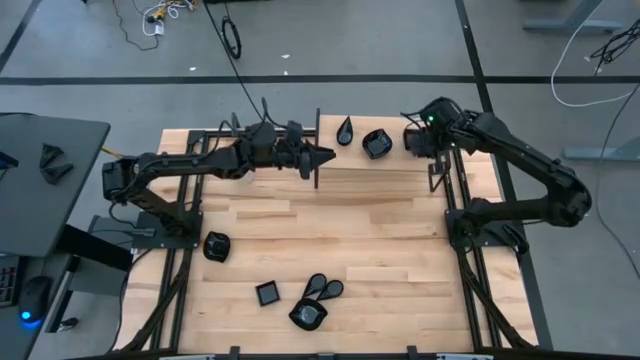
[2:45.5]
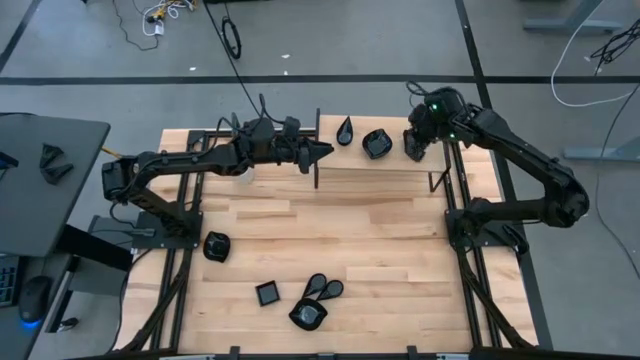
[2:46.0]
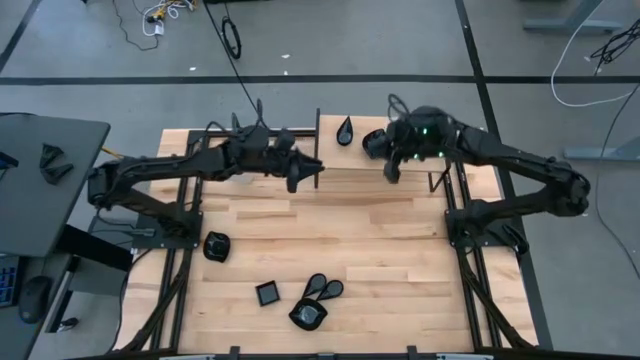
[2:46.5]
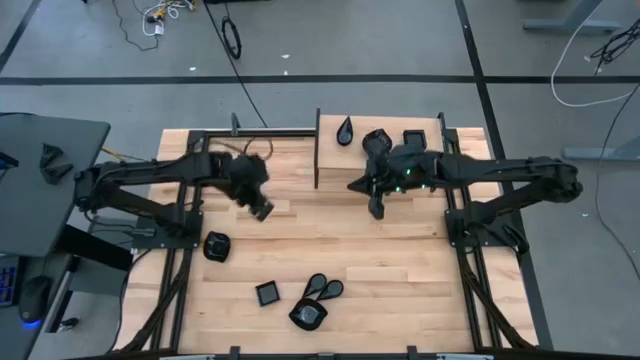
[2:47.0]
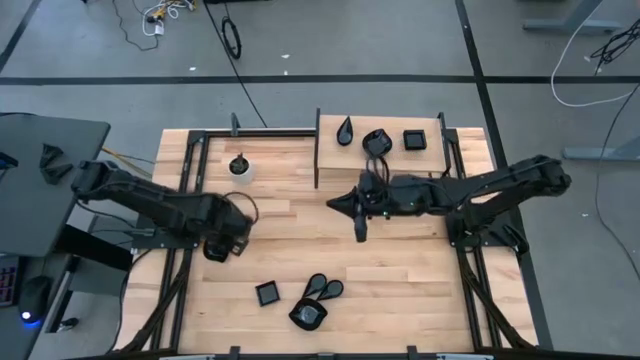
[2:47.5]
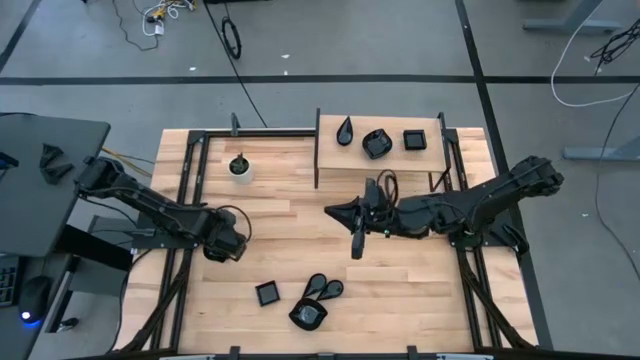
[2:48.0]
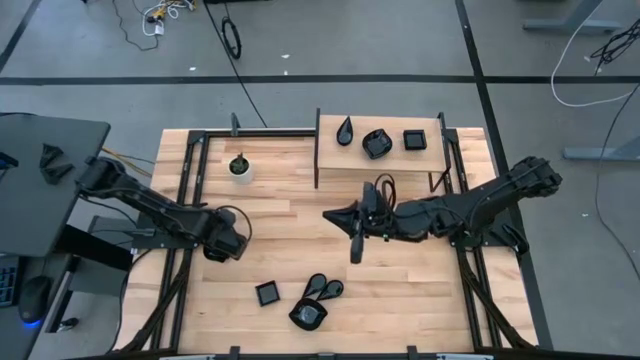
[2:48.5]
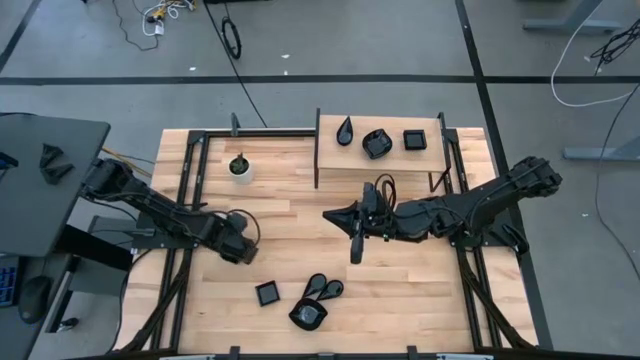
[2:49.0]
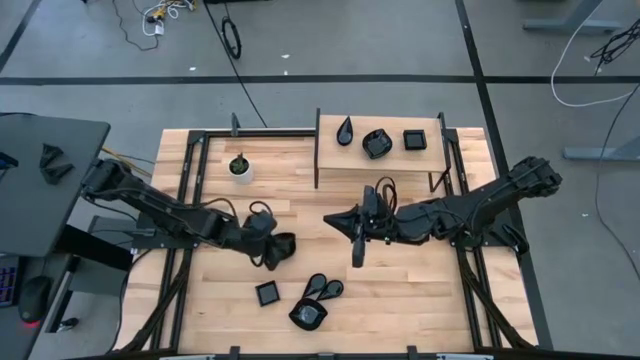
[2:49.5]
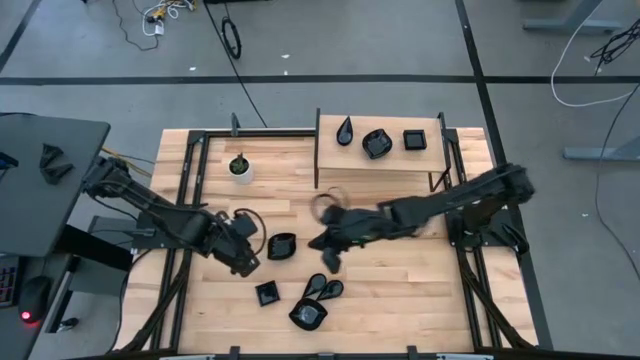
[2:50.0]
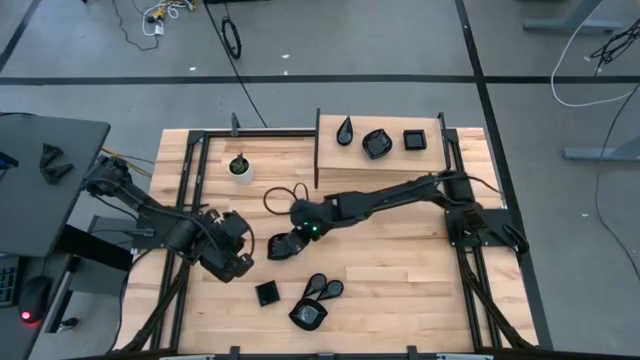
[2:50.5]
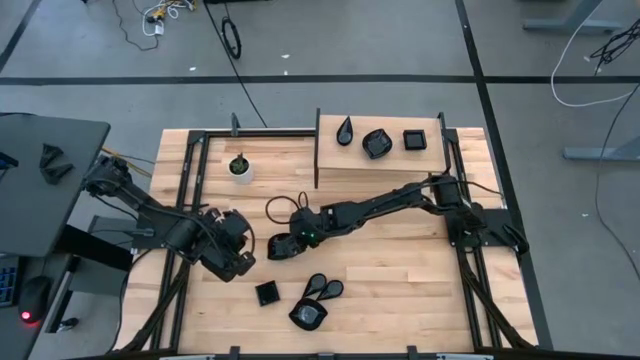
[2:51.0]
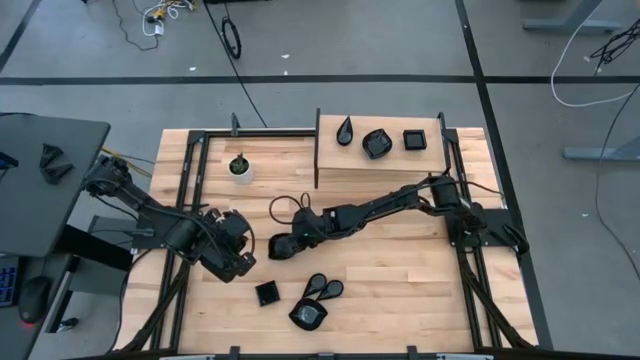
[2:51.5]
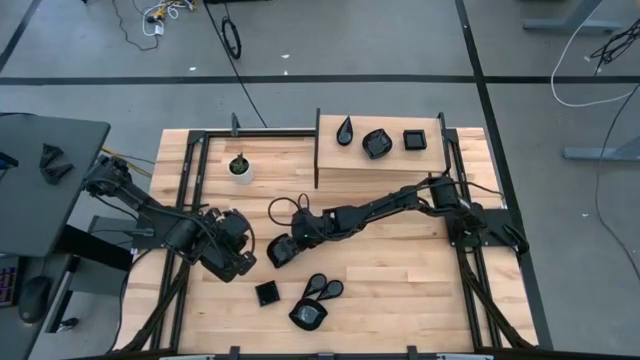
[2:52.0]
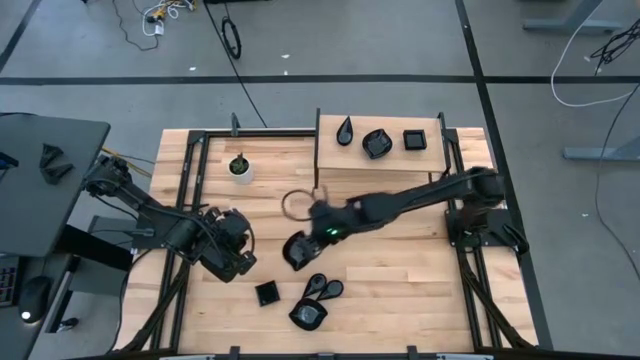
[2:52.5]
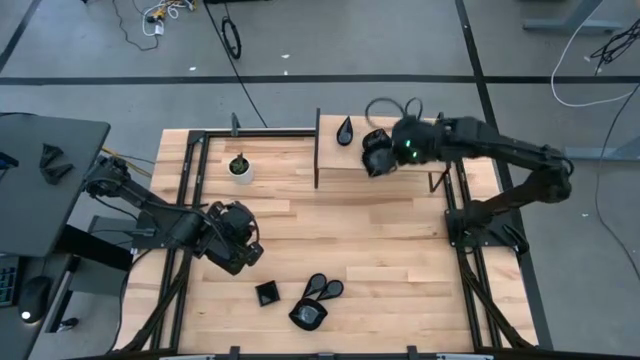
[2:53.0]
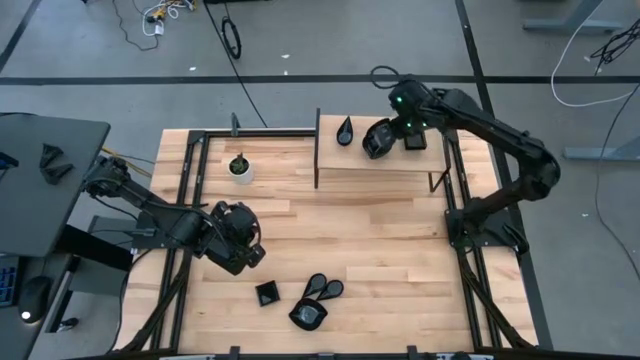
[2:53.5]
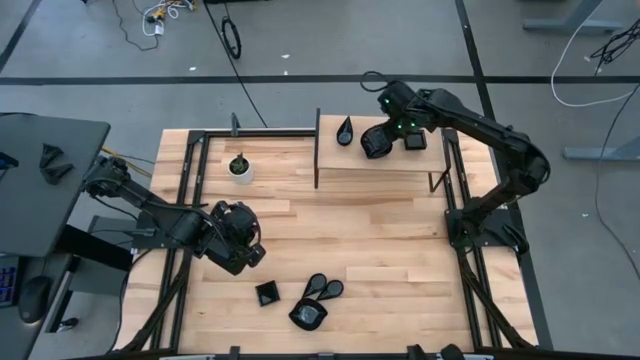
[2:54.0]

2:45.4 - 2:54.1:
Task: Pick & Place Mini shaped plates
Stack the leaf-shaped plate on top of the leaf-shaped plate on the shelf

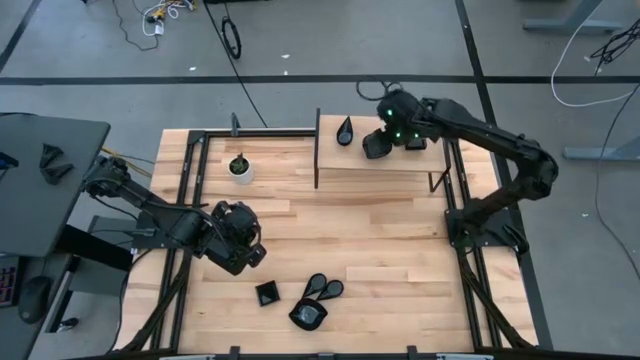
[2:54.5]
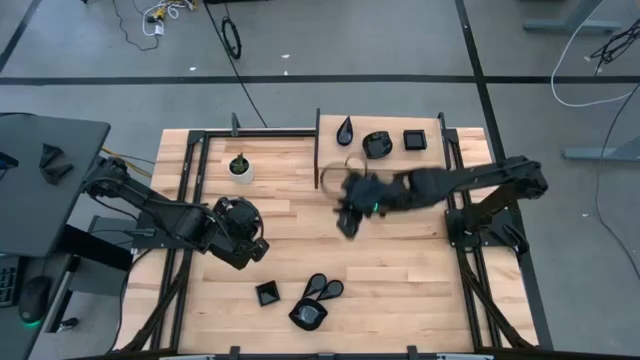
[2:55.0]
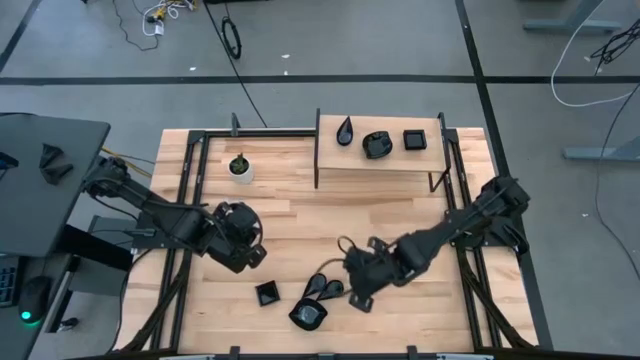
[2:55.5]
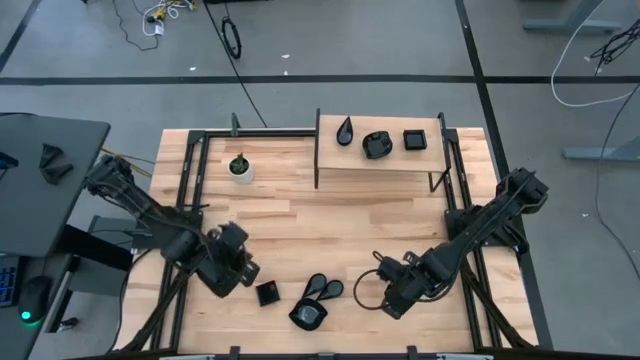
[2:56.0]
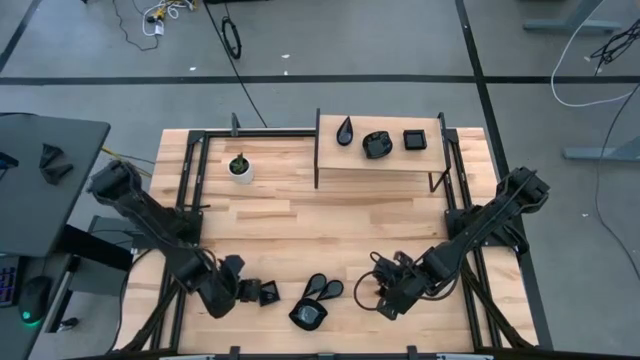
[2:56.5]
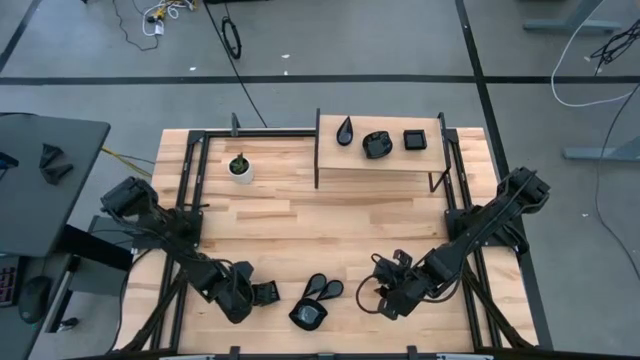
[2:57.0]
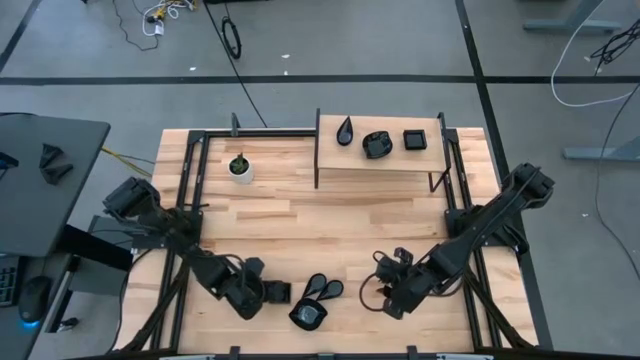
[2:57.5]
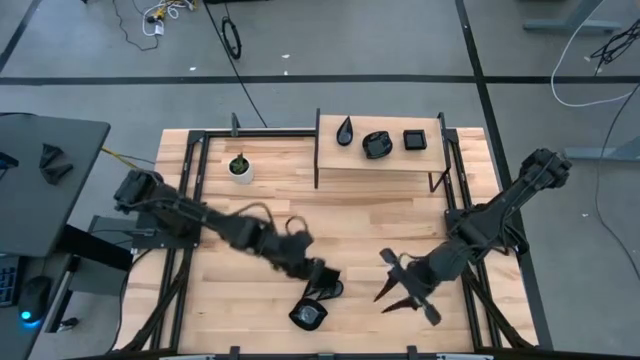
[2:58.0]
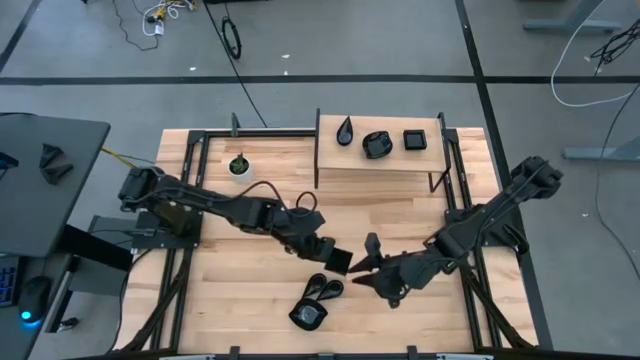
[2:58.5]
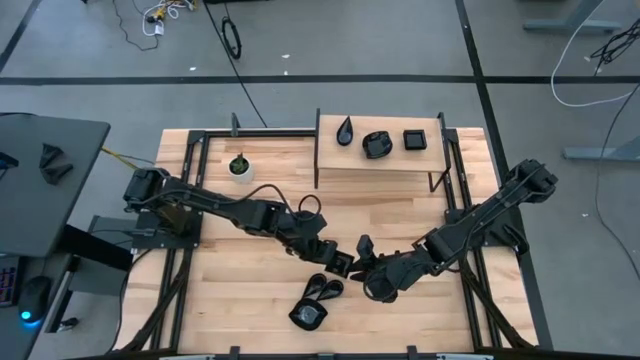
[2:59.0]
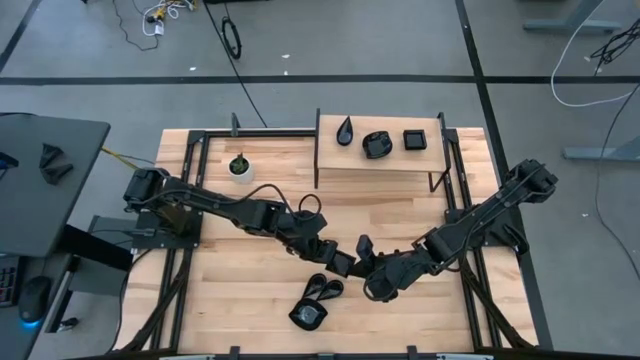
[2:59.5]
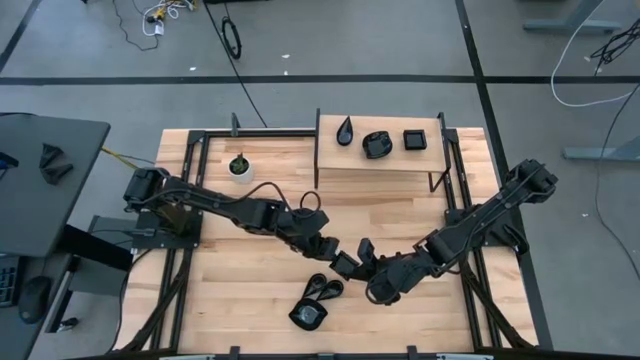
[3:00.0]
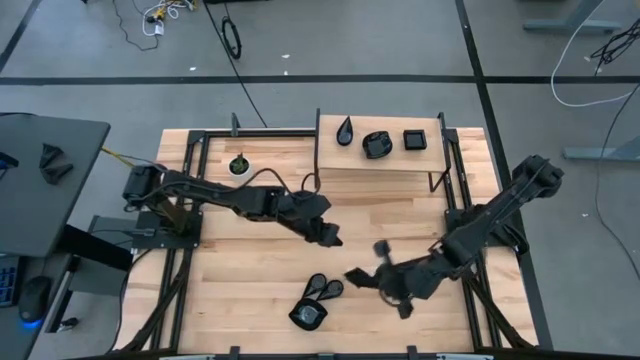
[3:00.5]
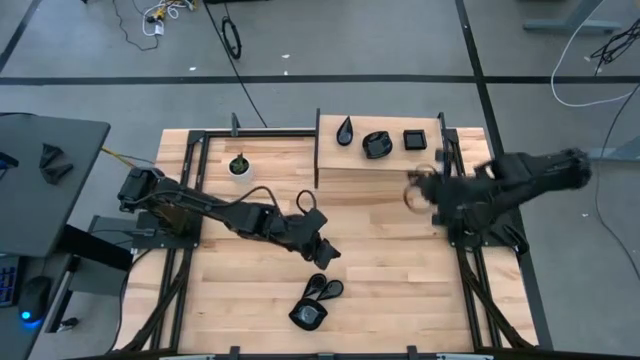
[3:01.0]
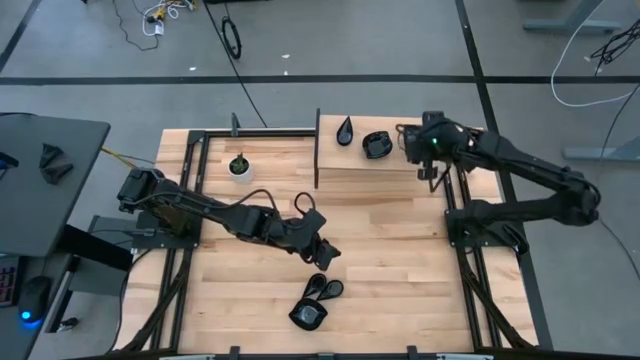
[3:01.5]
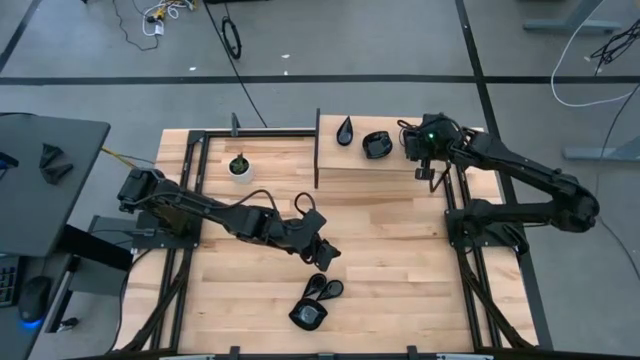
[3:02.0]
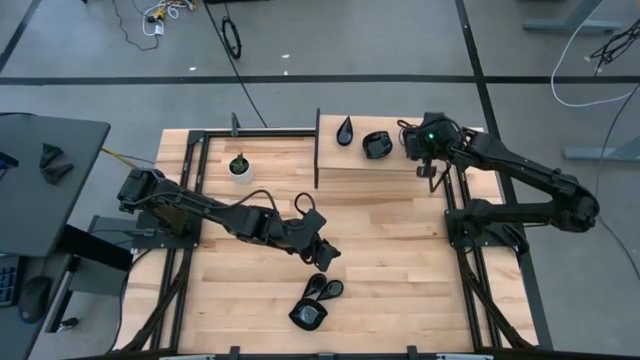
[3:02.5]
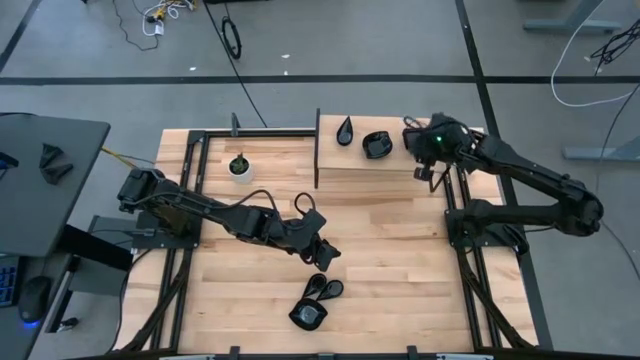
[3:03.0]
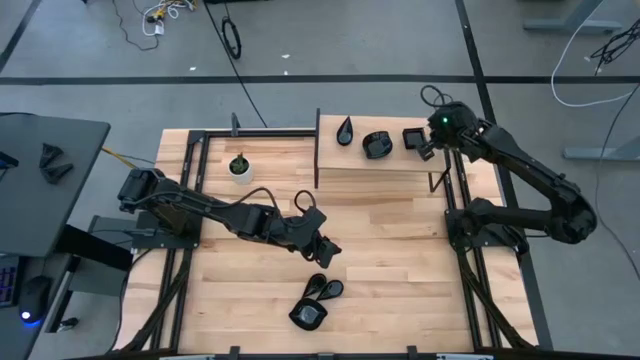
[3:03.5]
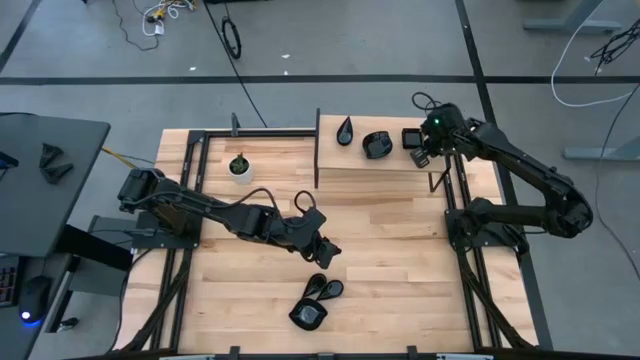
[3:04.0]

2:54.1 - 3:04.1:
Stack the square plate on top of the square plate on the shelf

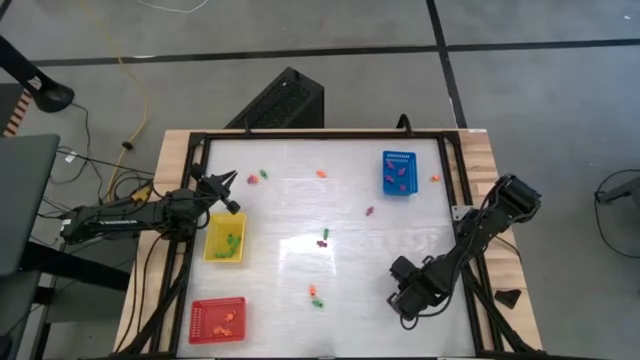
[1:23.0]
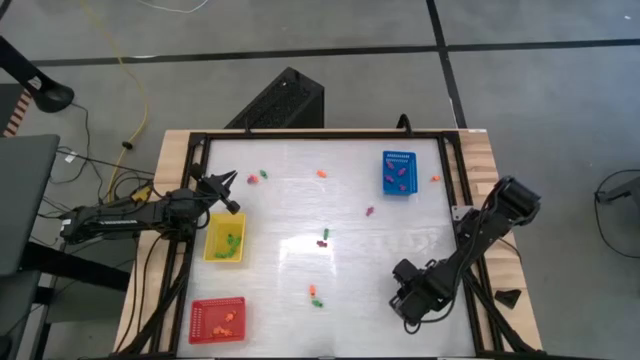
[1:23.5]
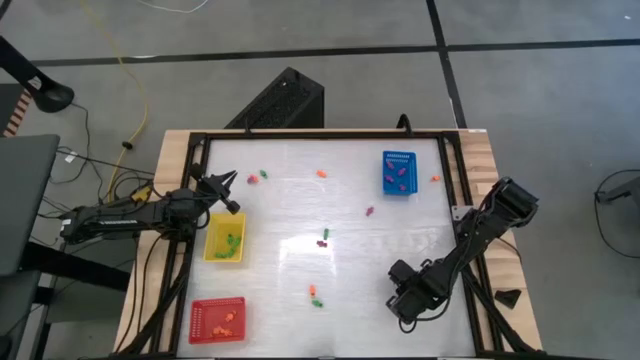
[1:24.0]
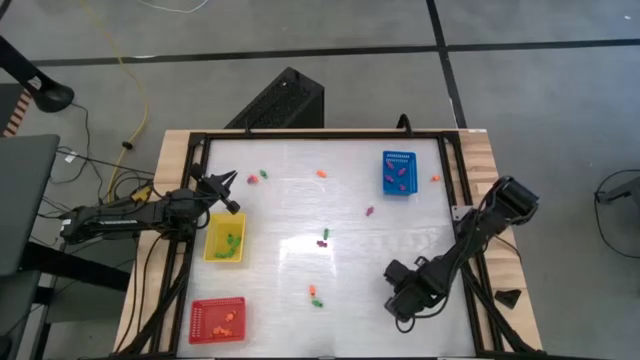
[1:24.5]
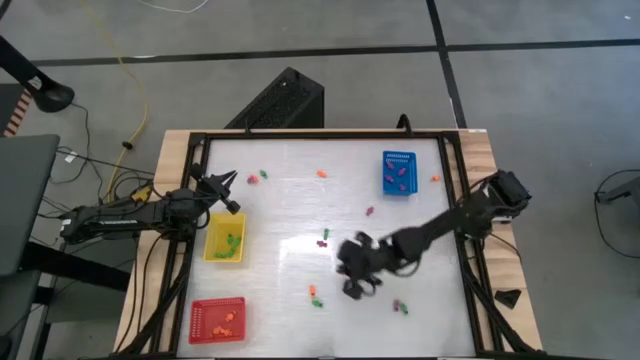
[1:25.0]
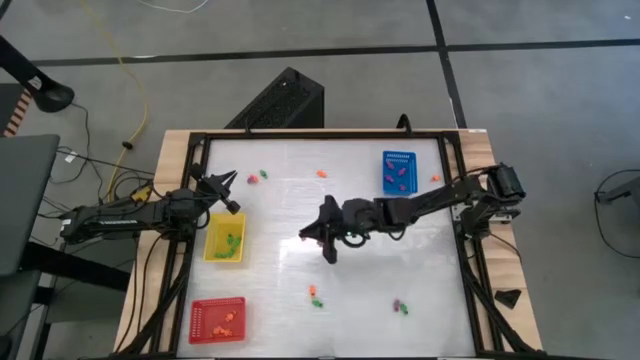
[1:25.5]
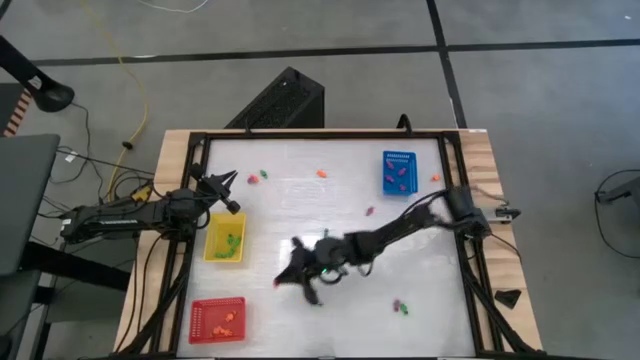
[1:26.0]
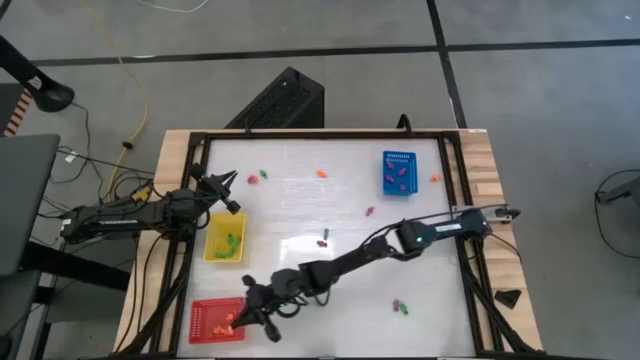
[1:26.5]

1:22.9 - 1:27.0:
Task: Sort Halloween decoration
Put the orange skeleton toy into the red bin
